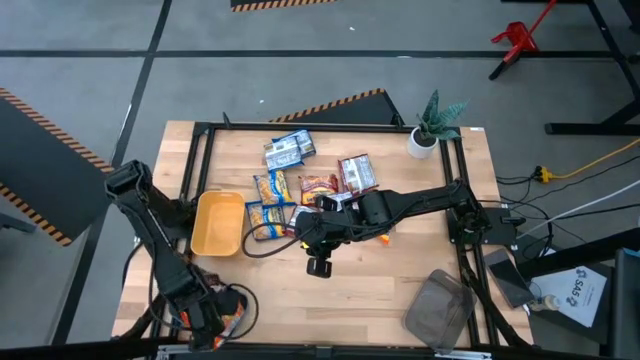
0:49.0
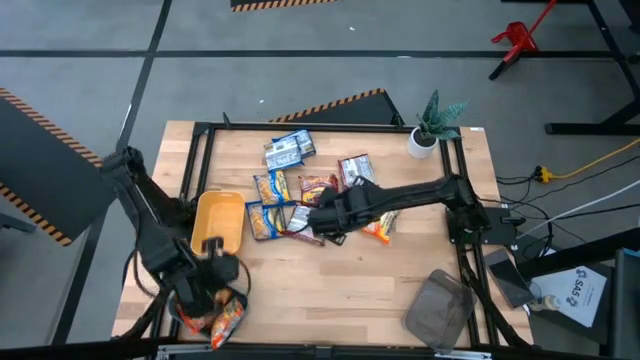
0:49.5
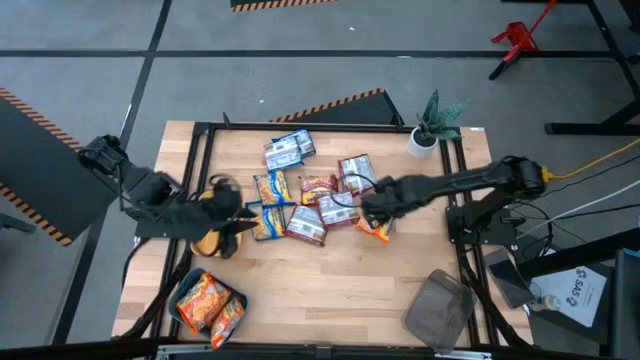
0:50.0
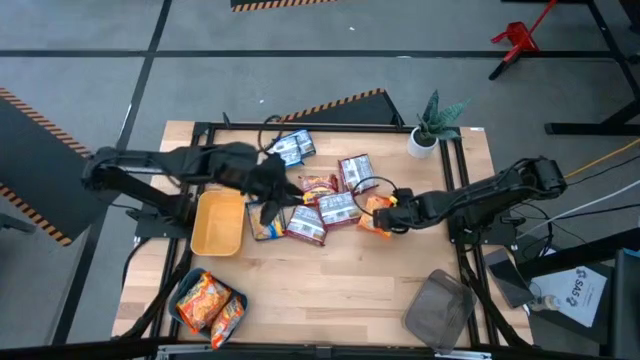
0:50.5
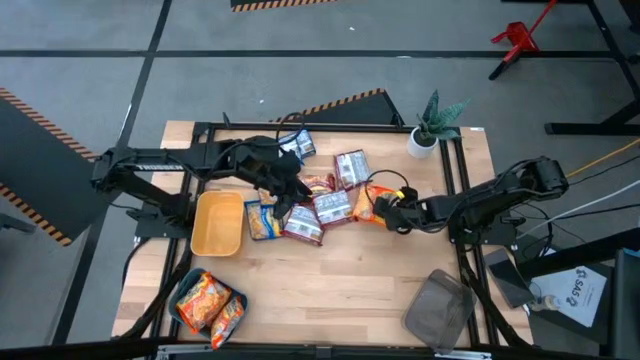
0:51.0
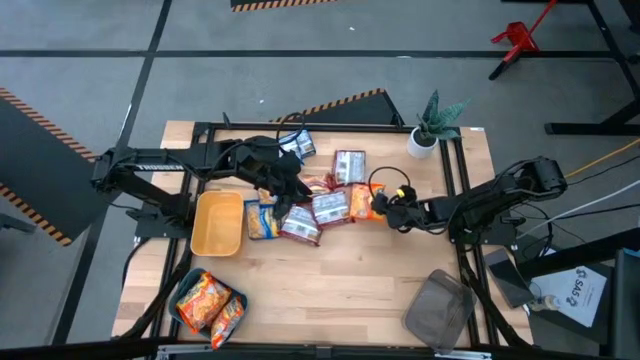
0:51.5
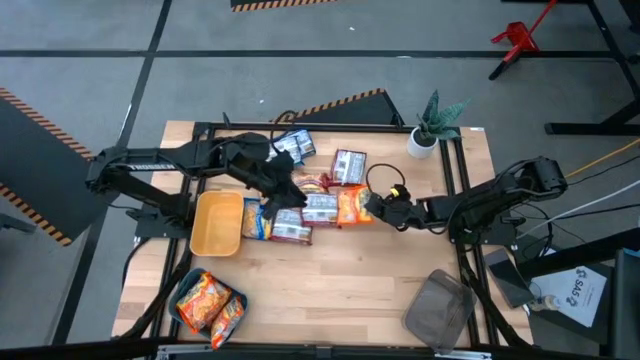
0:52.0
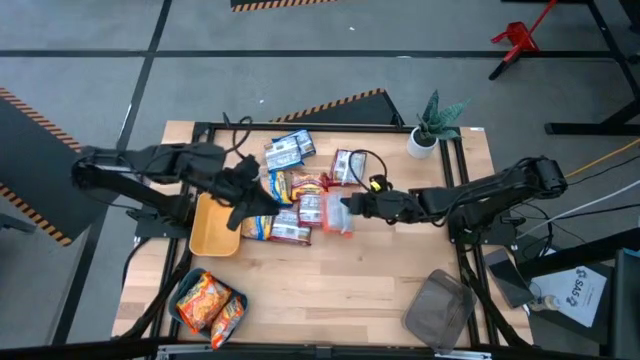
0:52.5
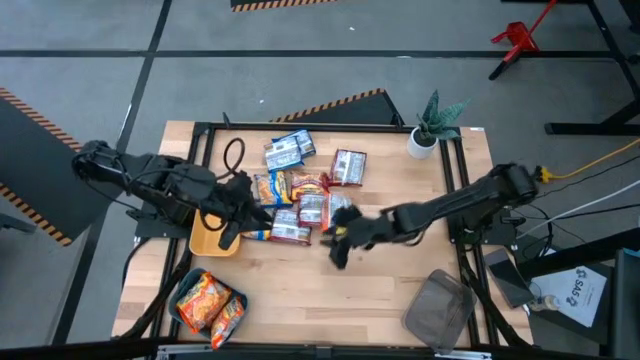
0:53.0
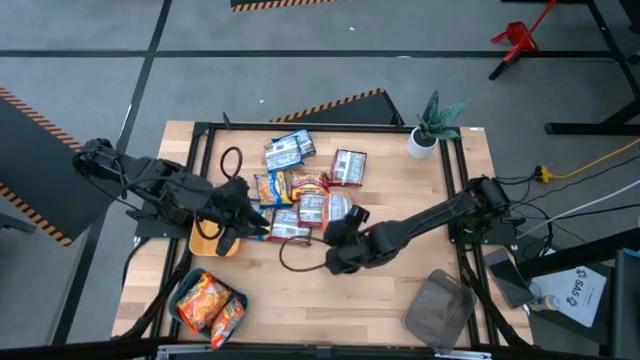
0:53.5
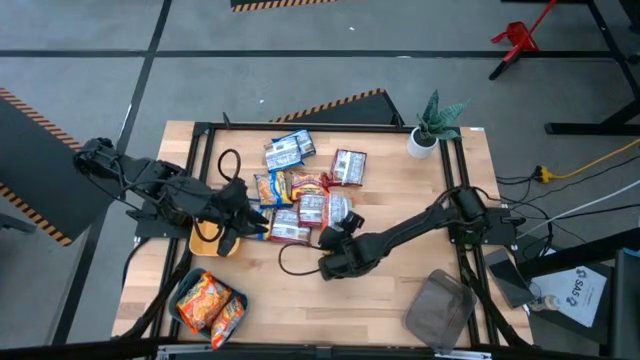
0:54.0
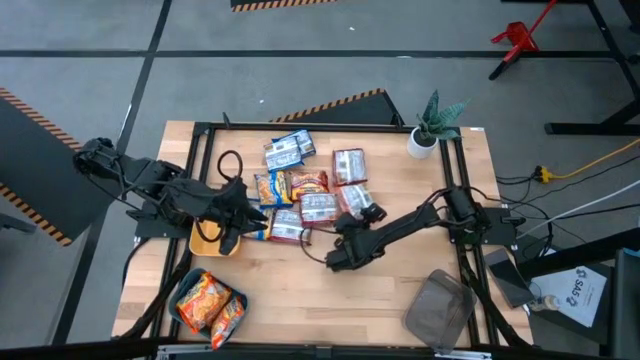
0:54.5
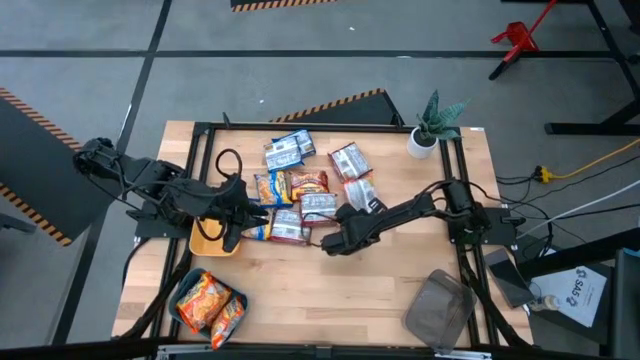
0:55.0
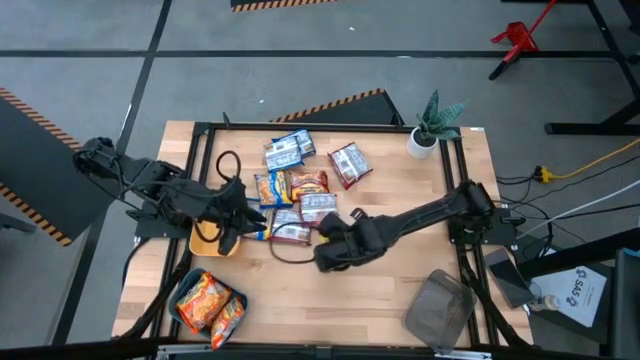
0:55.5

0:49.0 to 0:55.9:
Task: Sort Maruchan noodles
Put the orange noodle pack into the blue bin

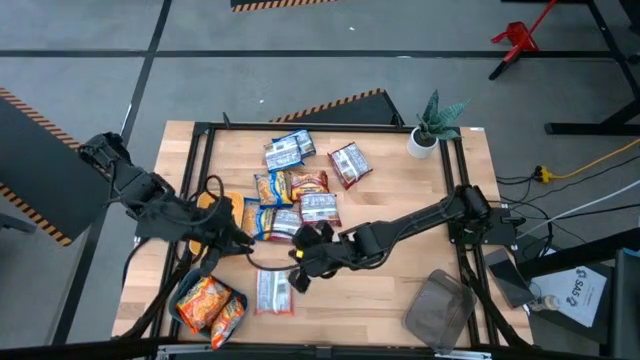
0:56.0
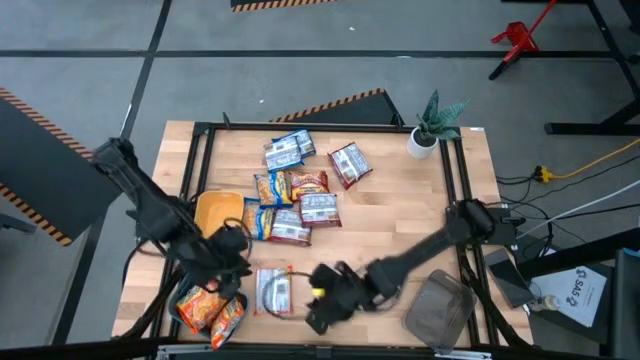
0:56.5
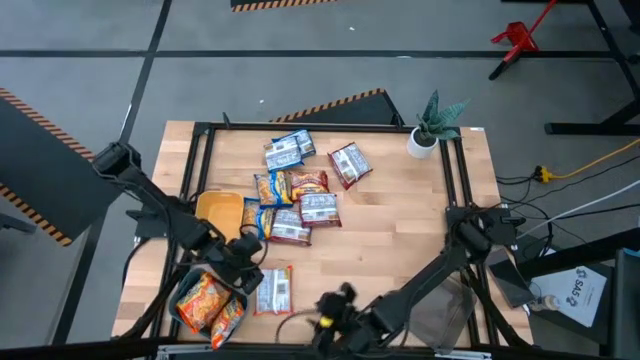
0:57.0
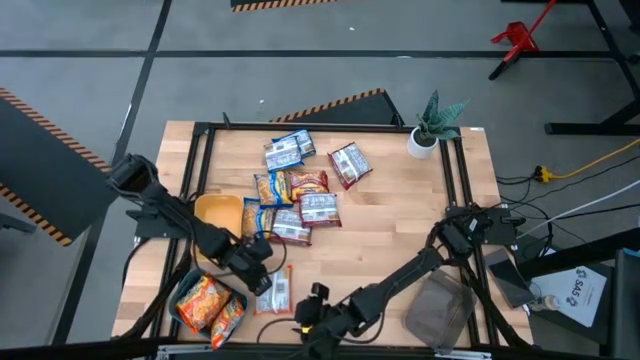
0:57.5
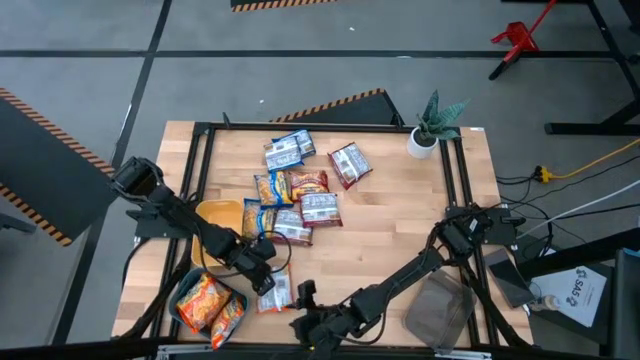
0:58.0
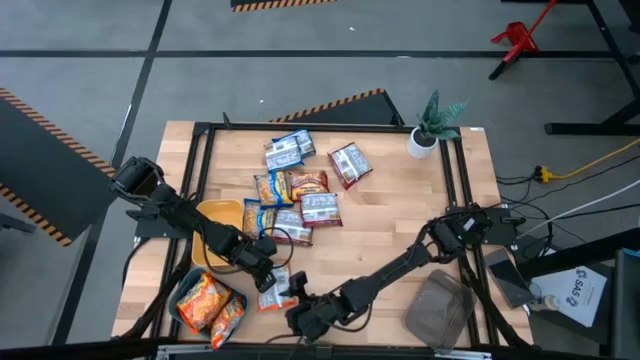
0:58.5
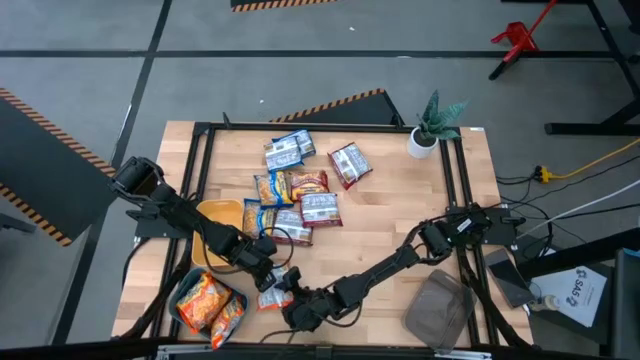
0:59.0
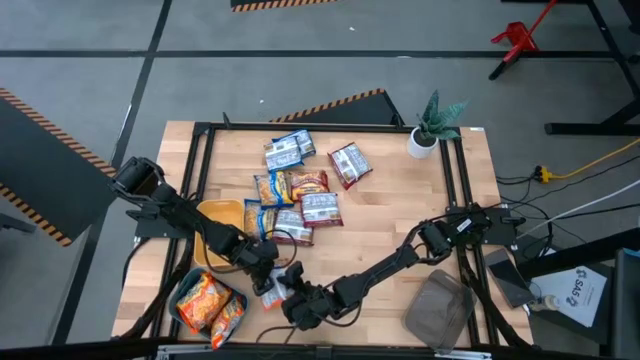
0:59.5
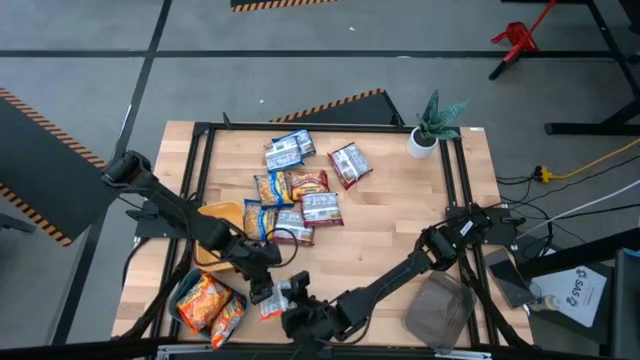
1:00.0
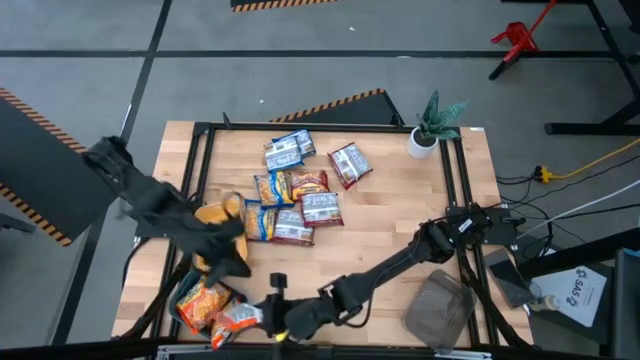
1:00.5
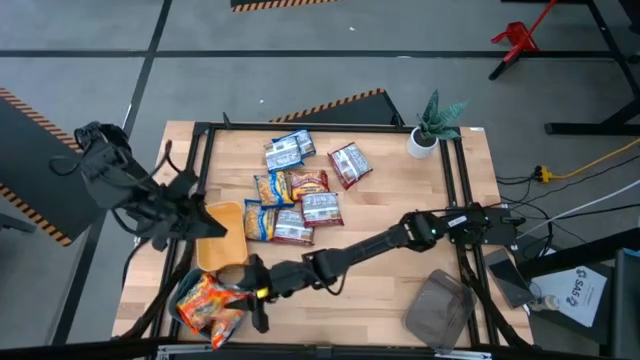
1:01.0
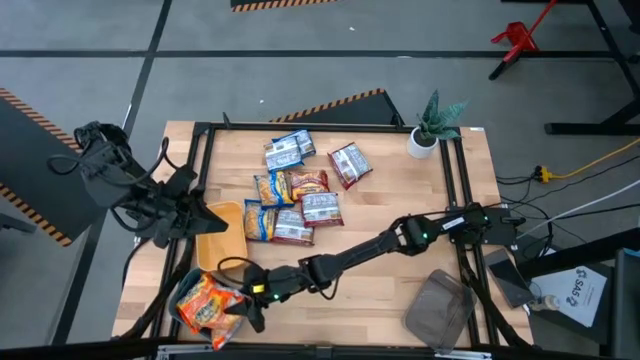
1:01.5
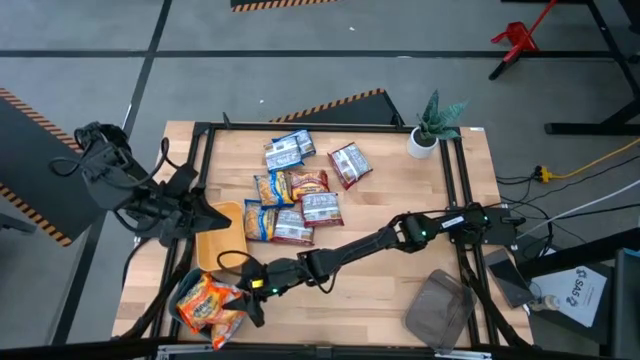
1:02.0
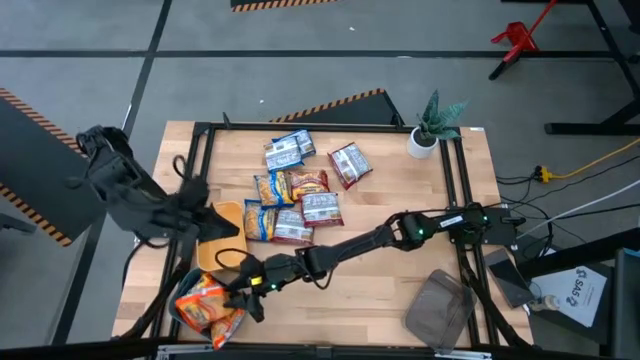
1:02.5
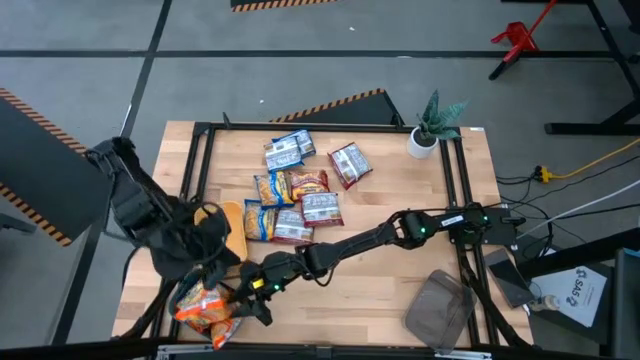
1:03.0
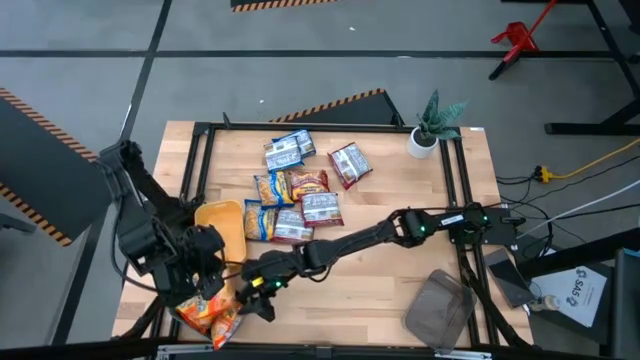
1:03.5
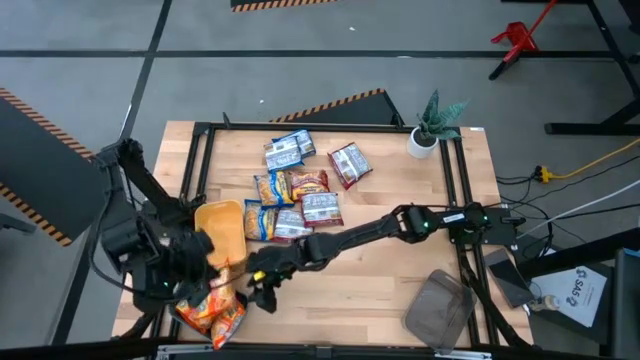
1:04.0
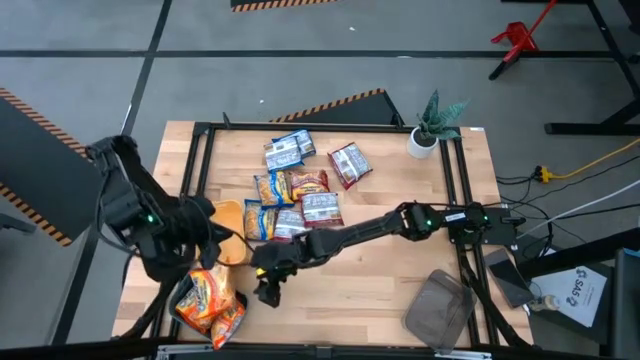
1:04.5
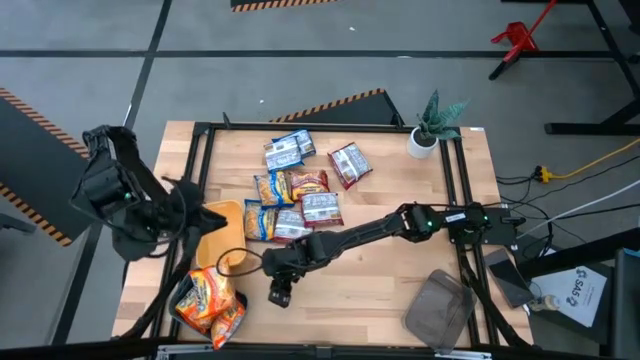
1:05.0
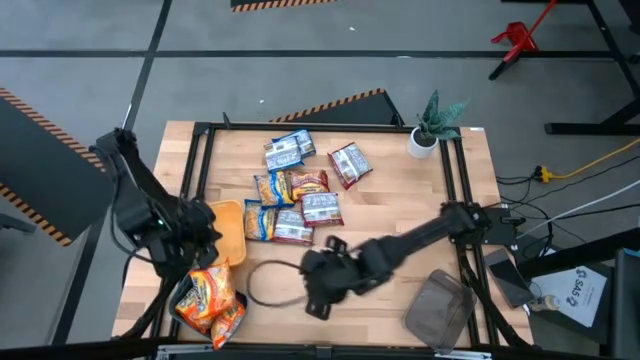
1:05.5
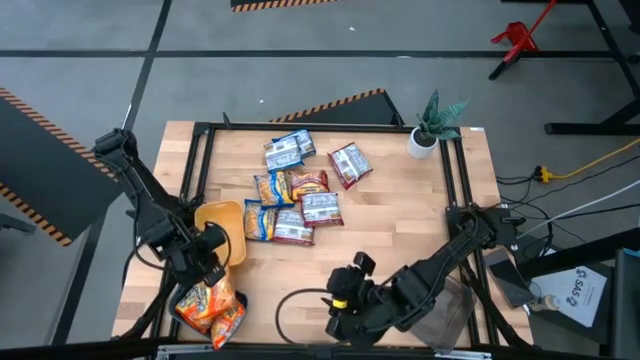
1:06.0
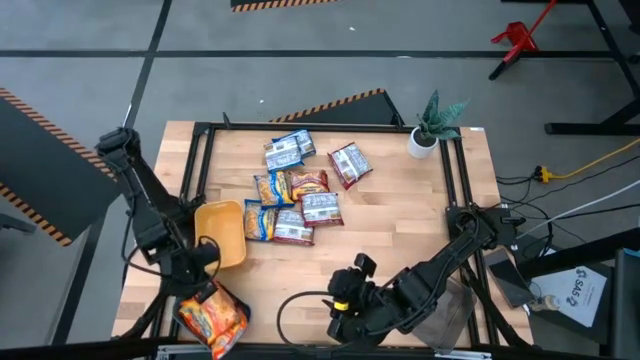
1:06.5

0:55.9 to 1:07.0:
Put the orange noodle pack into the blue bin

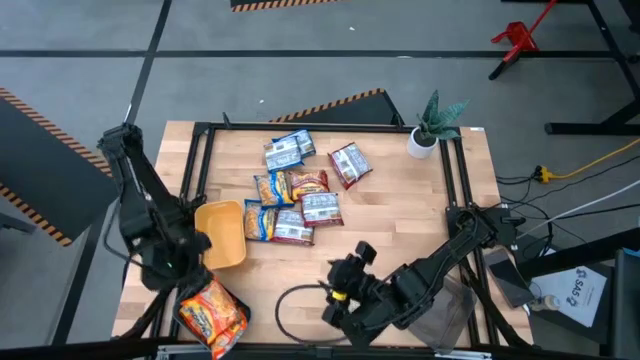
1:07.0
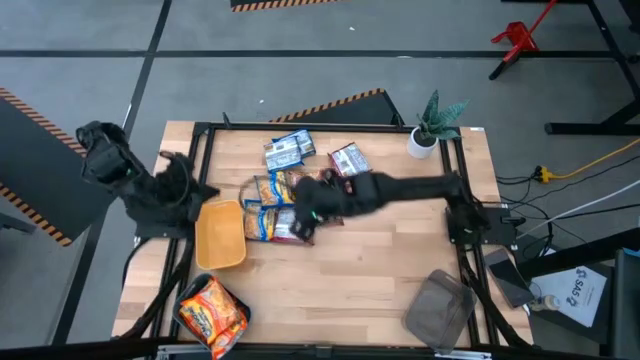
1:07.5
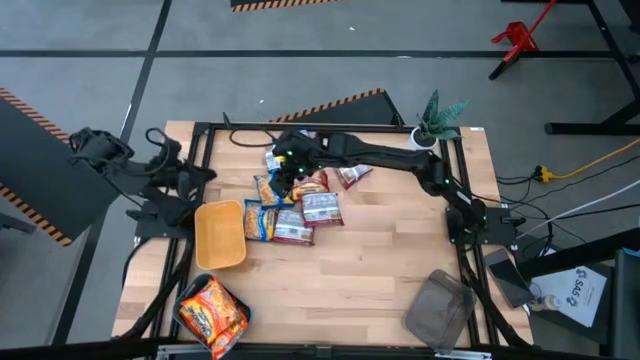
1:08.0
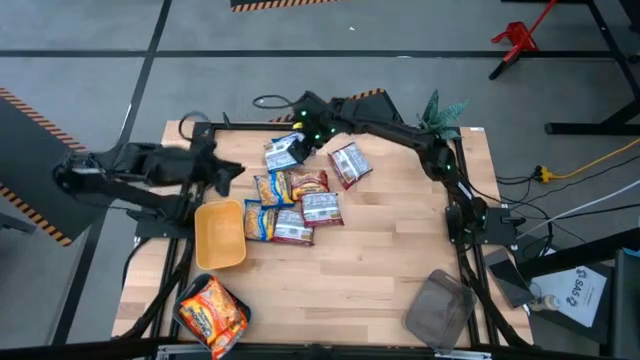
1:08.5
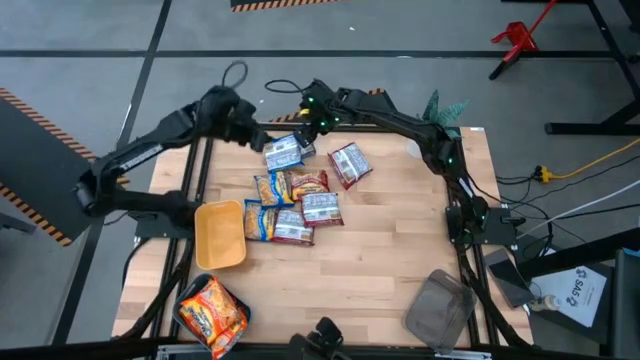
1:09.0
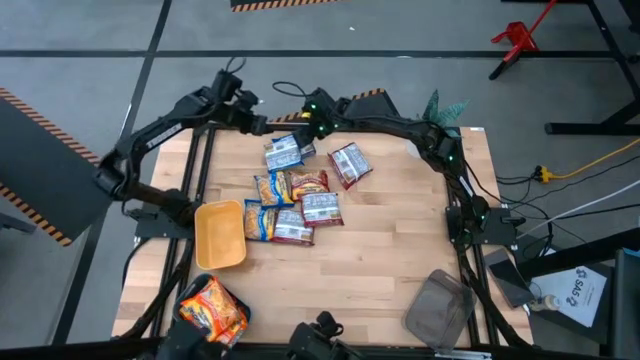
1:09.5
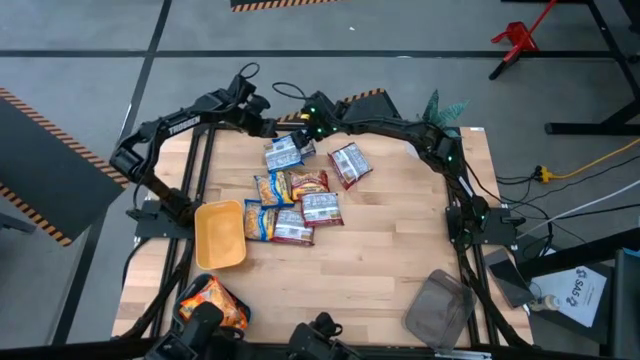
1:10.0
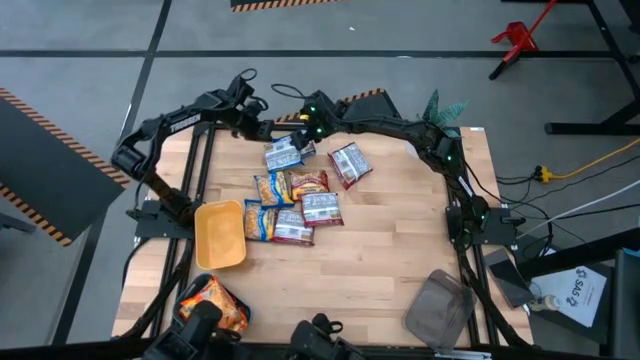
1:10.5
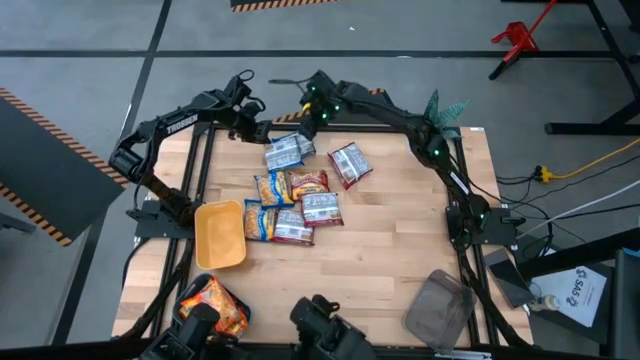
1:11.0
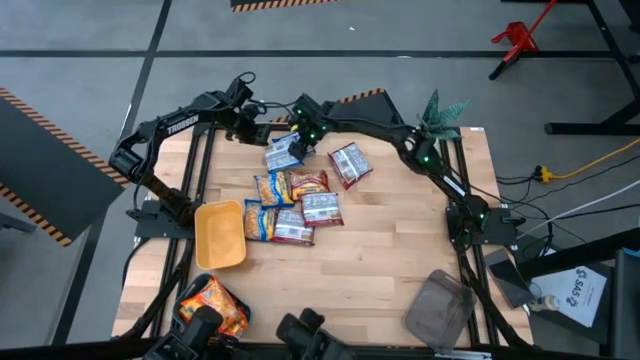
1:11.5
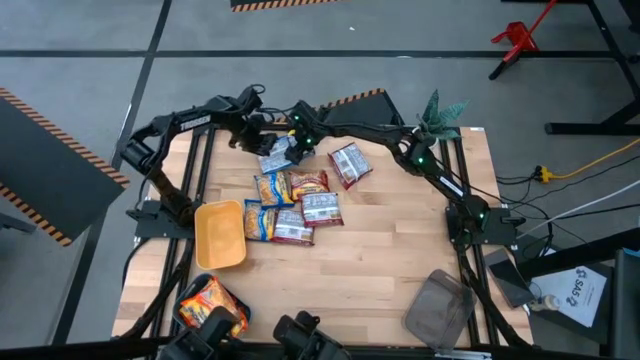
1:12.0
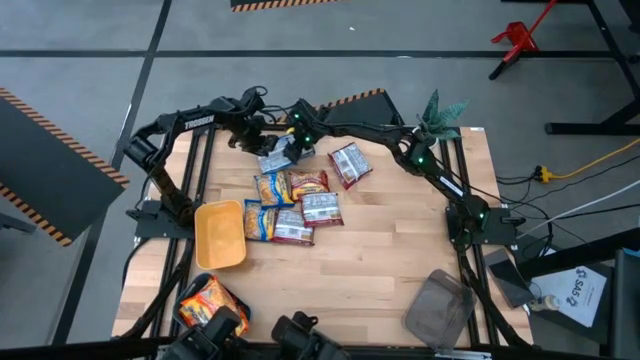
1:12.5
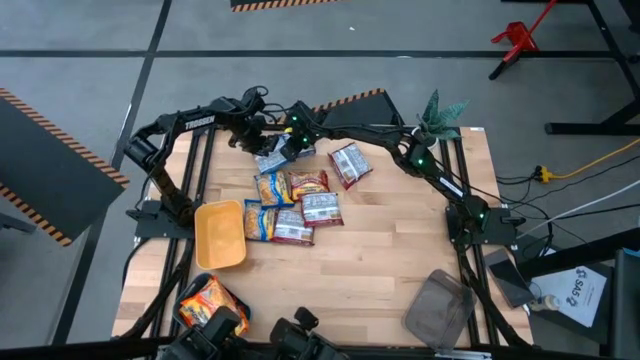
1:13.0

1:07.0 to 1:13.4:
Put the blue noodle pack into the yellow bin
